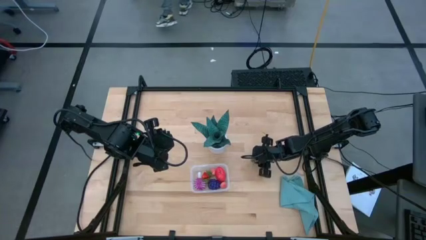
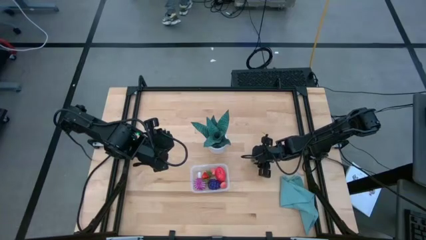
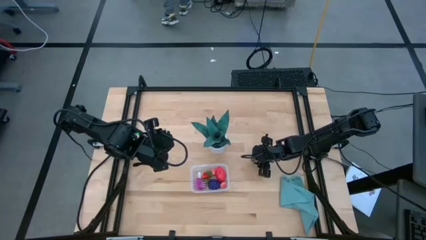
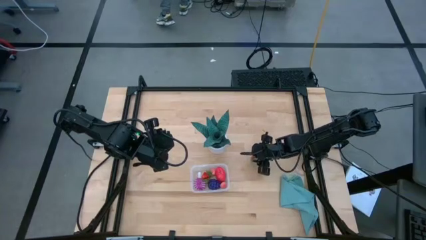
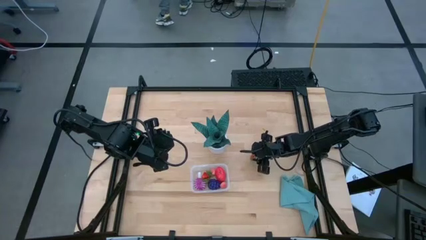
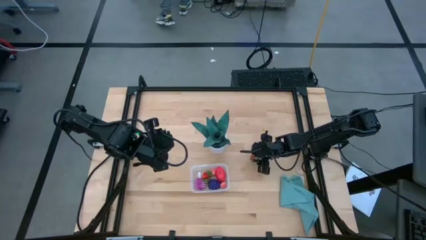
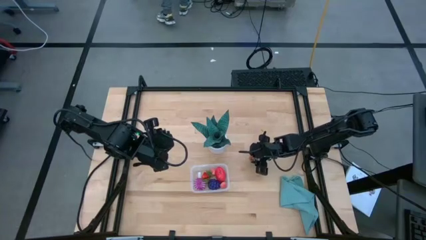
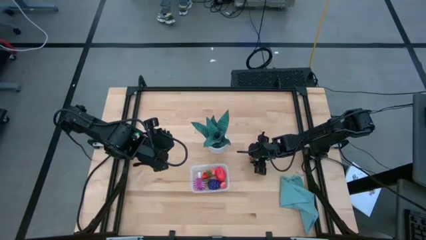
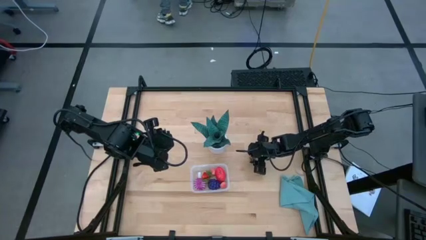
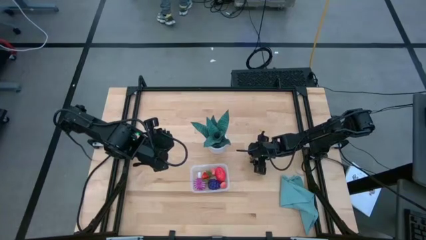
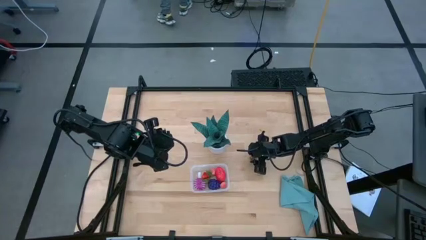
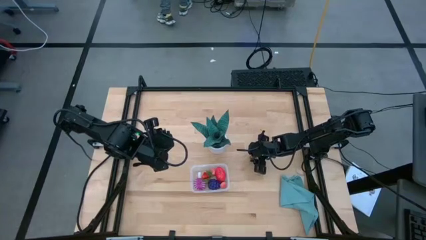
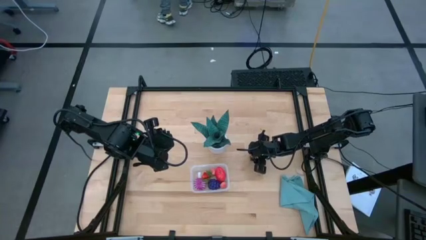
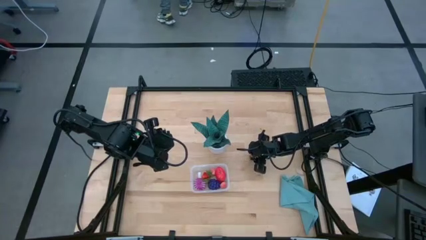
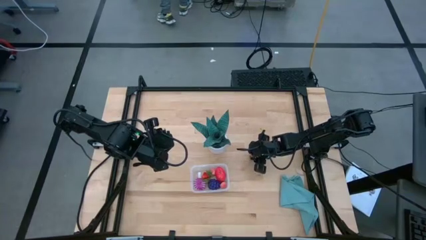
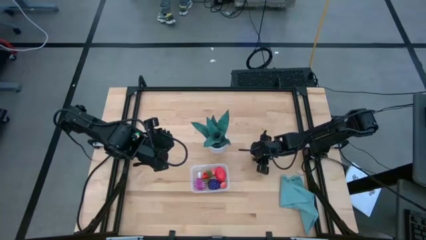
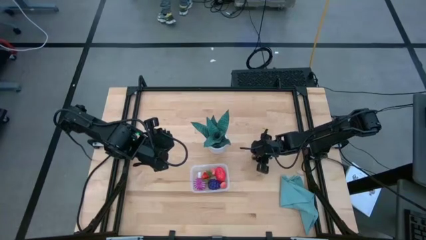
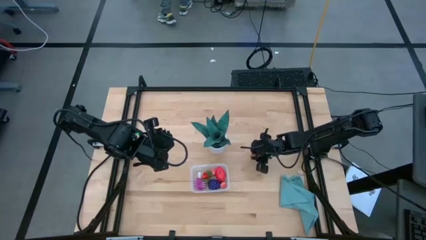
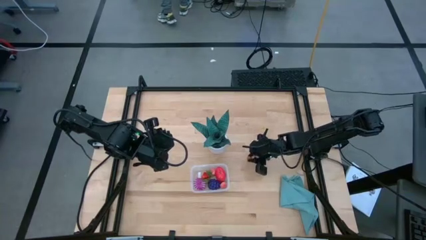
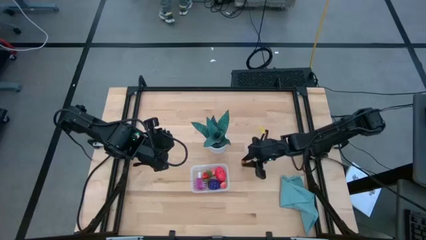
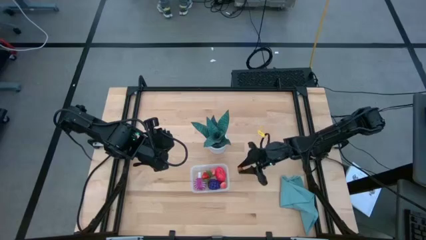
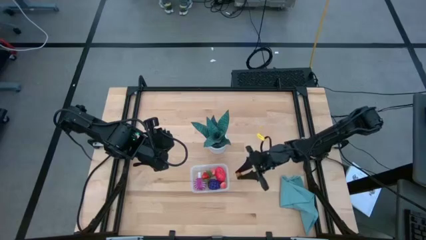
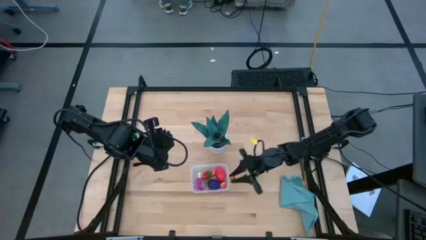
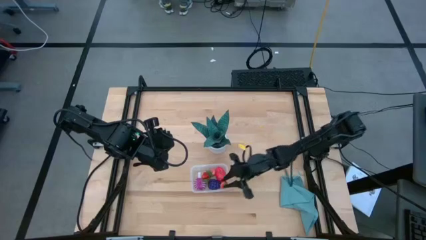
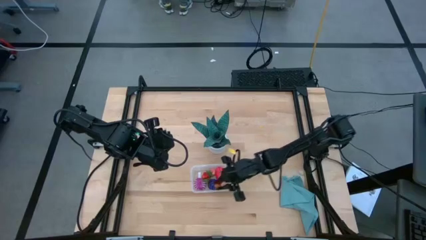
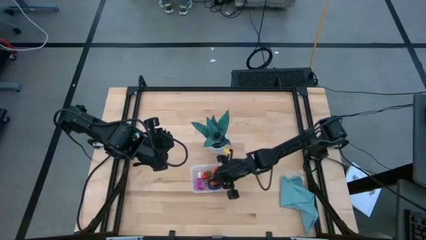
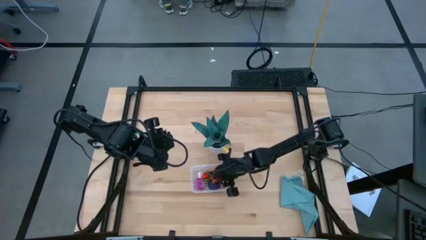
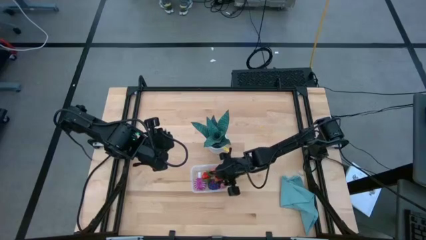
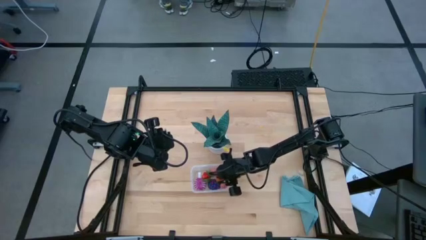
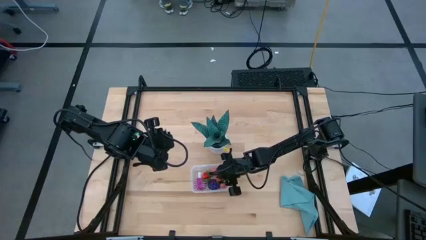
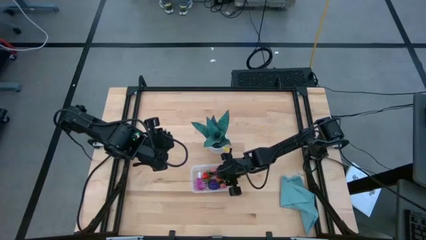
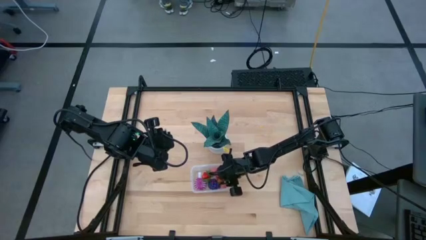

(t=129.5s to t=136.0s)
Task: Pick and placing Produce into tupperware
Put the red strawberry into the transparent bin

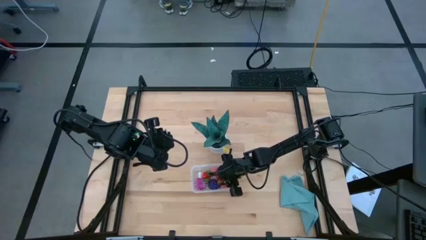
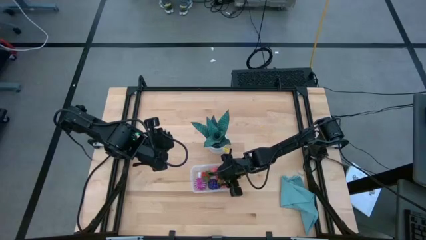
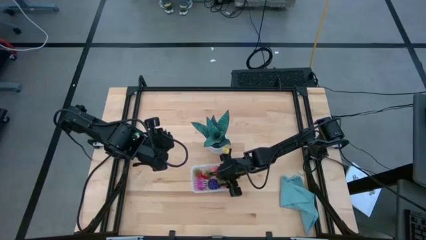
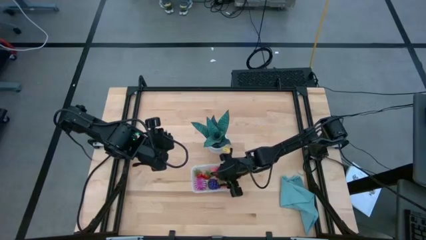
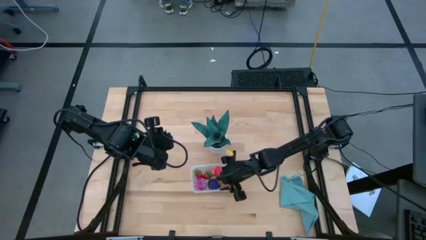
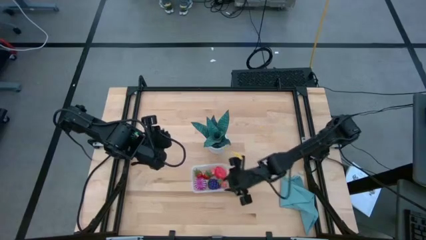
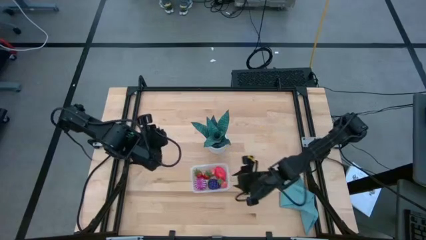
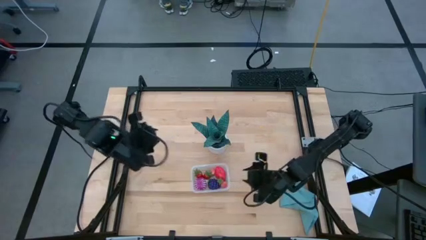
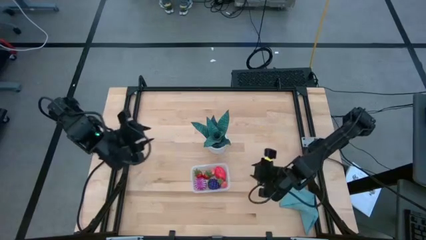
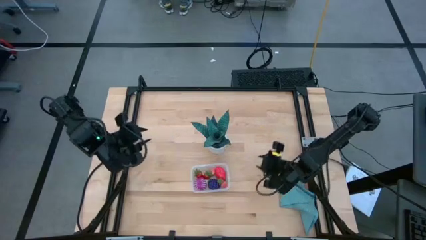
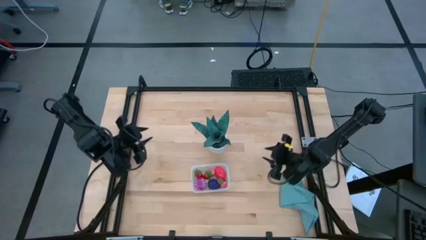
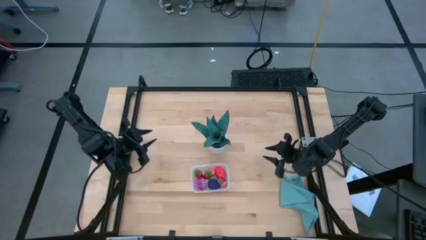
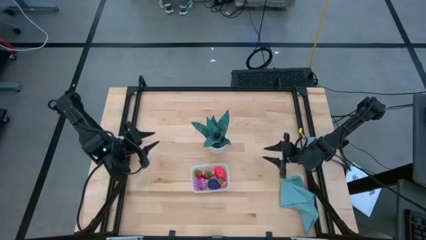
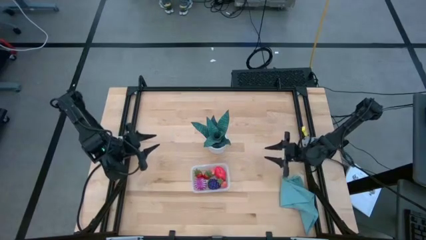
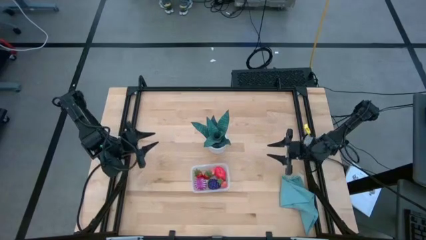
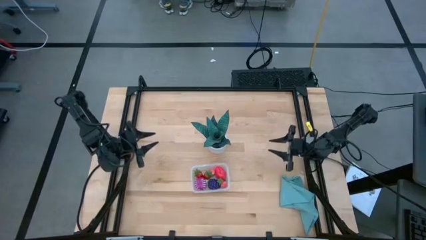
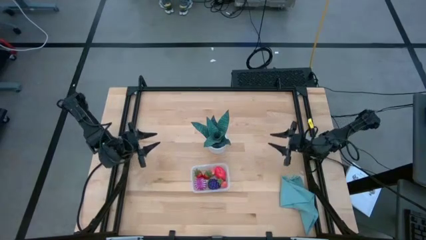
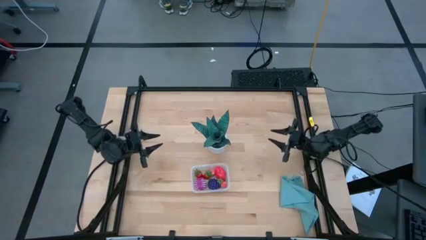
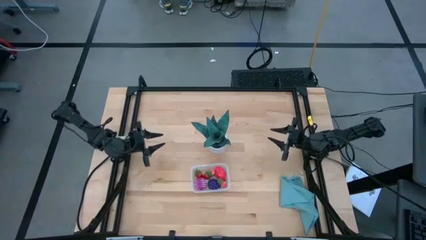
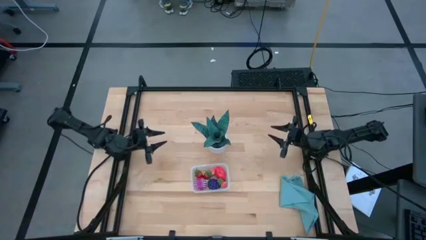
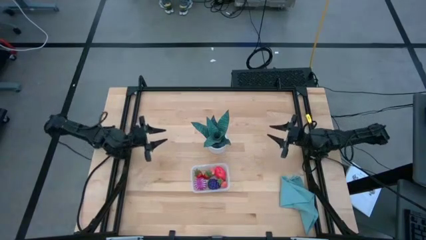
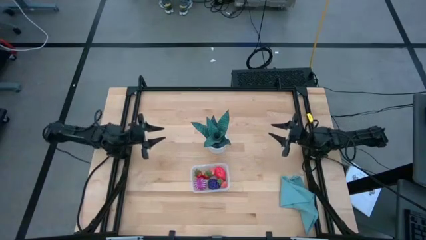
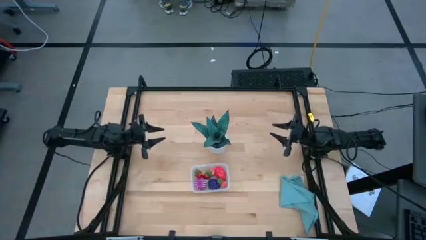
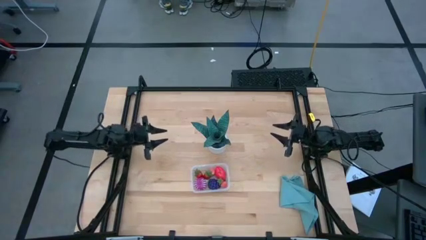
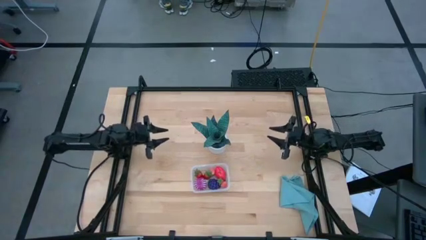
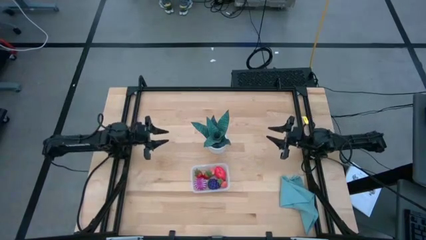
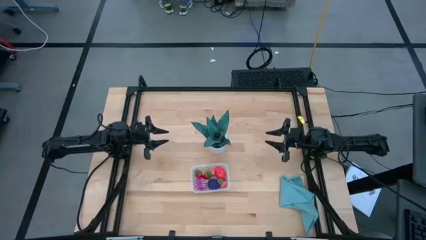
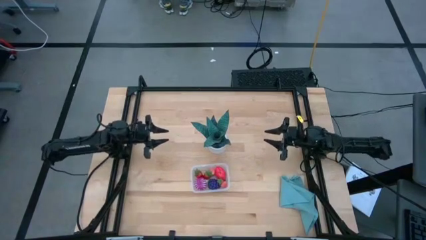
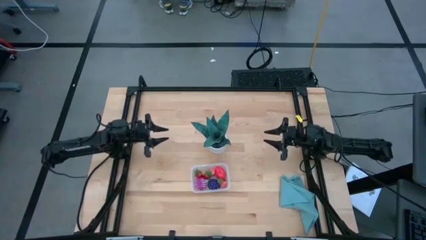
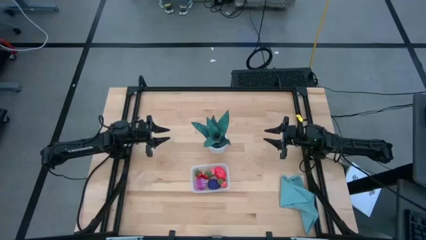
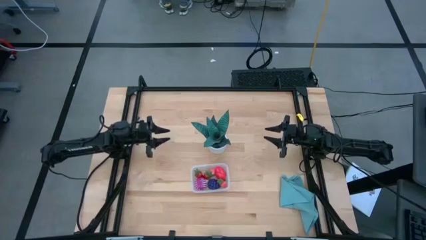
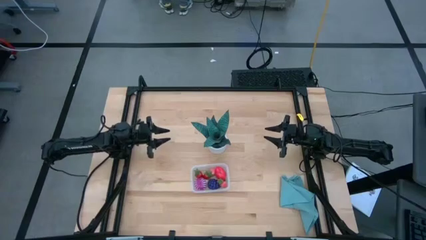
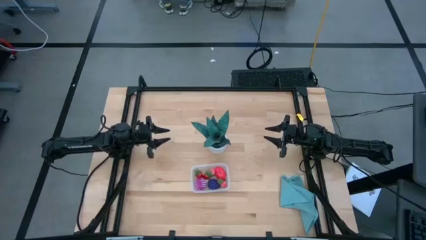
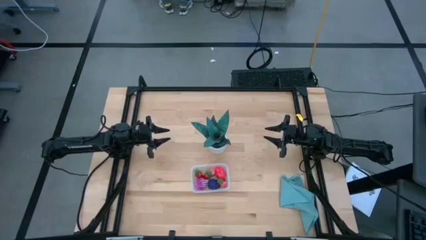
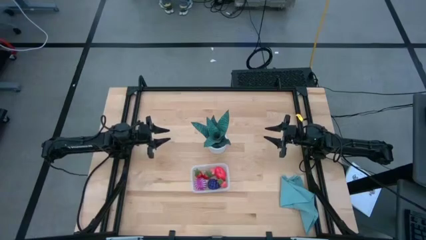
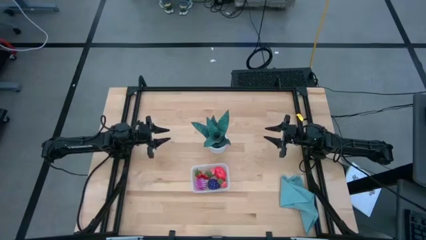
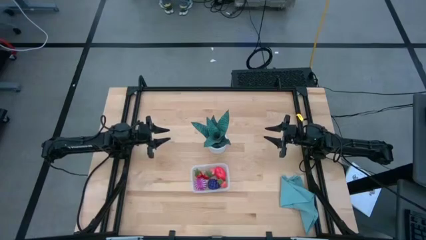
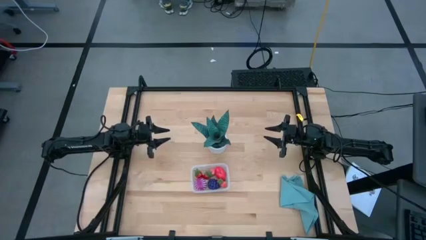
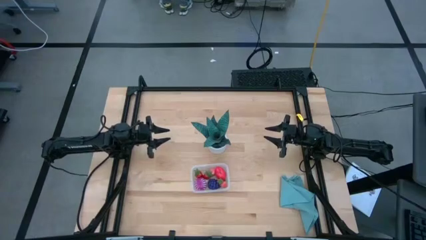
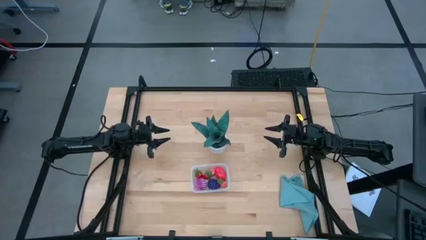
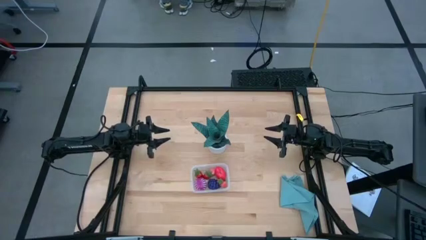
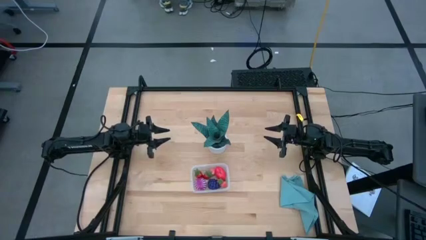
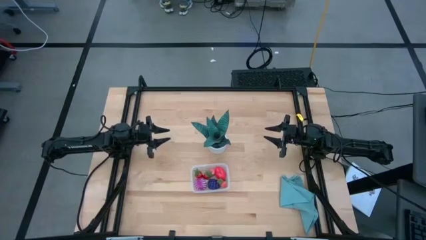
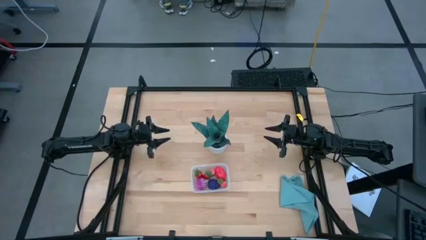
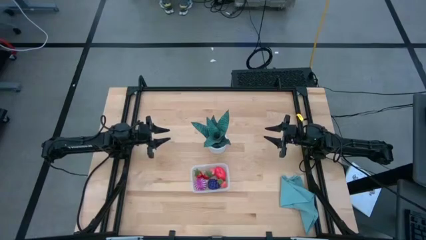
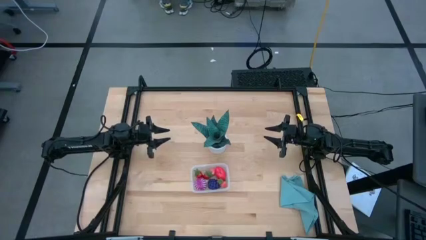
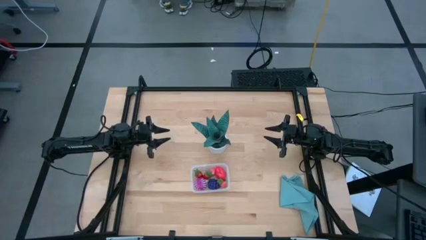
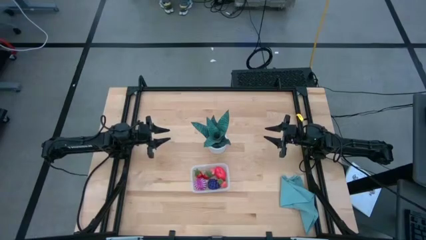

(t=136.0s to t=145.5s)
Return to Home Position
